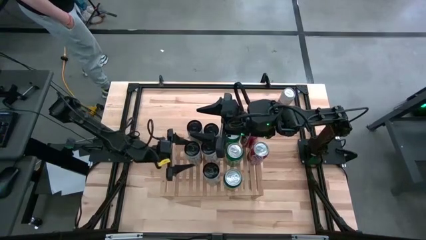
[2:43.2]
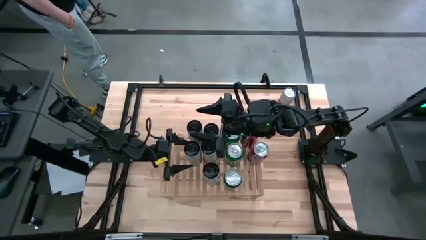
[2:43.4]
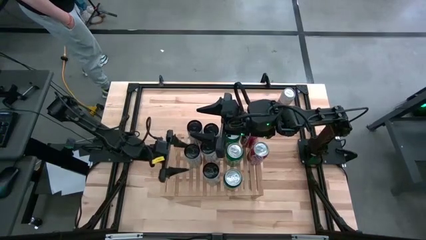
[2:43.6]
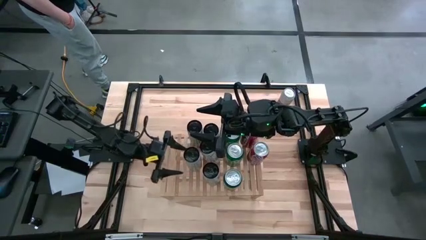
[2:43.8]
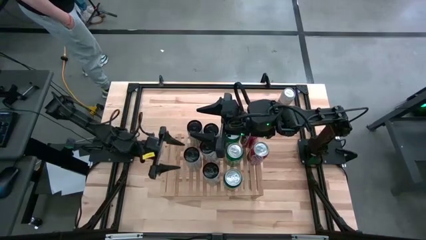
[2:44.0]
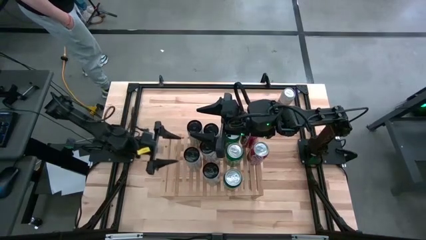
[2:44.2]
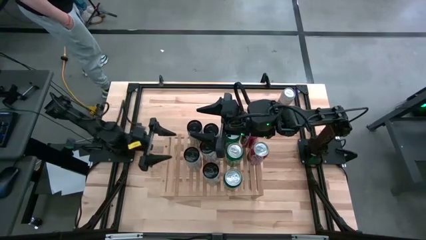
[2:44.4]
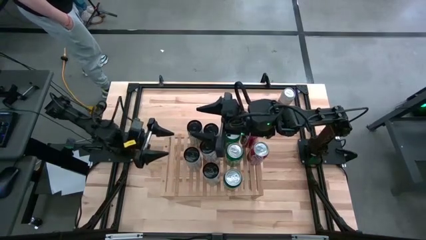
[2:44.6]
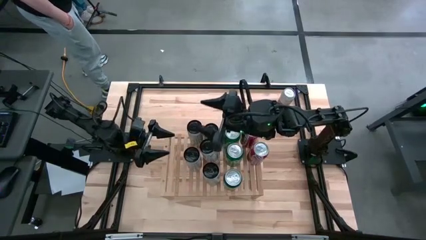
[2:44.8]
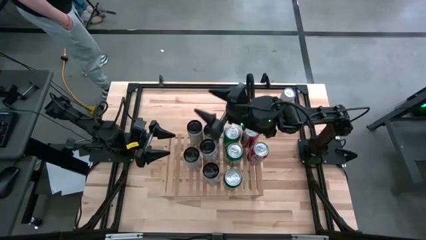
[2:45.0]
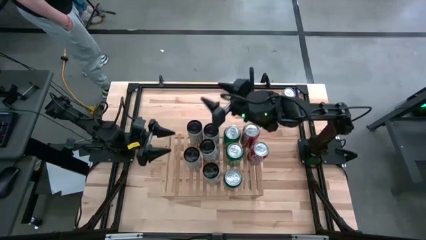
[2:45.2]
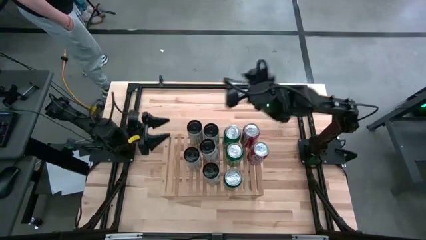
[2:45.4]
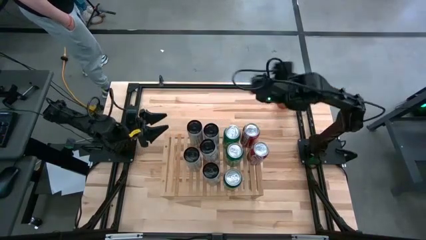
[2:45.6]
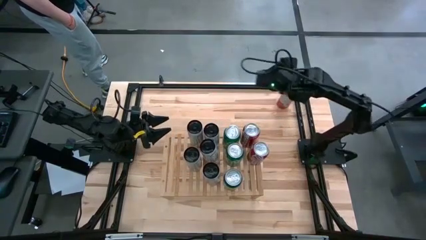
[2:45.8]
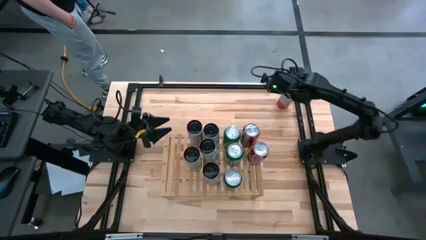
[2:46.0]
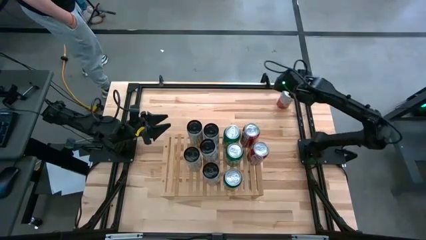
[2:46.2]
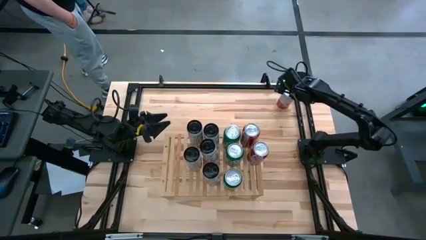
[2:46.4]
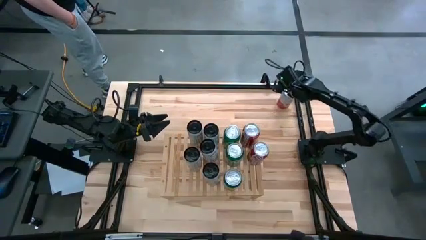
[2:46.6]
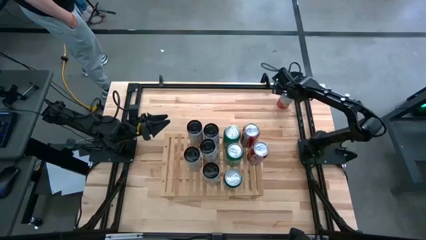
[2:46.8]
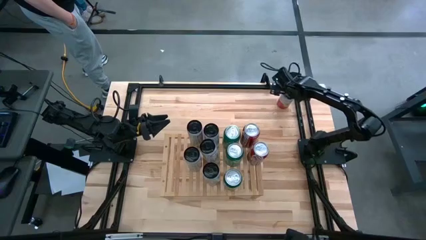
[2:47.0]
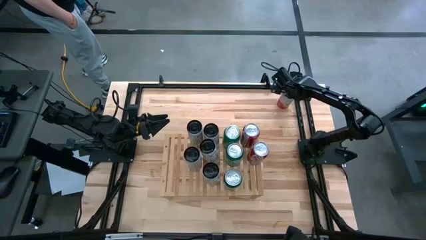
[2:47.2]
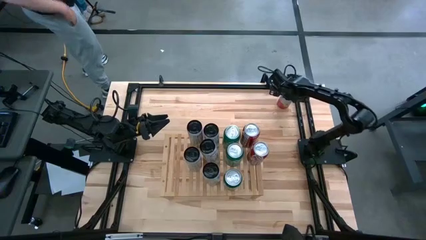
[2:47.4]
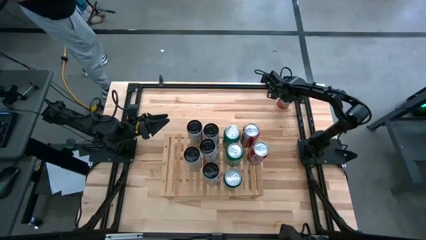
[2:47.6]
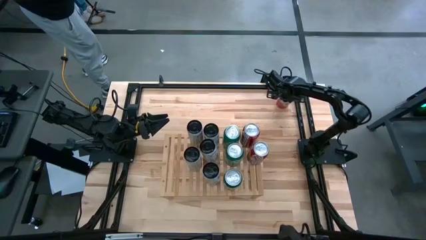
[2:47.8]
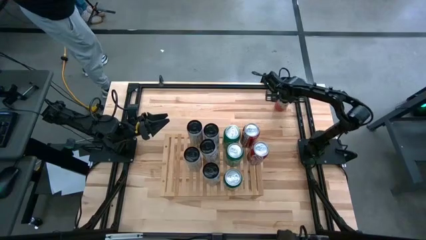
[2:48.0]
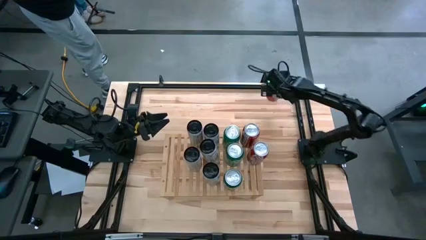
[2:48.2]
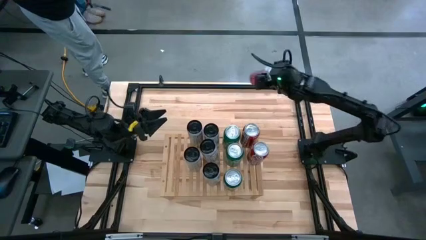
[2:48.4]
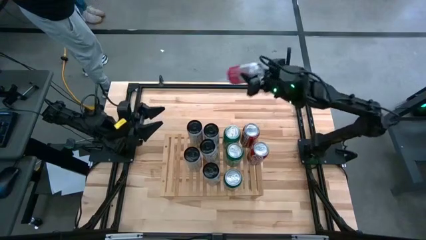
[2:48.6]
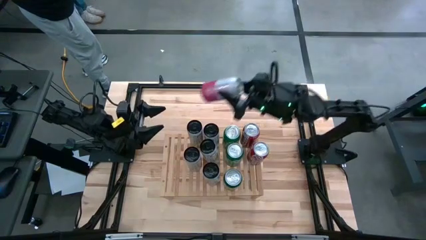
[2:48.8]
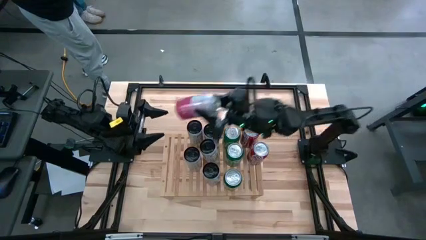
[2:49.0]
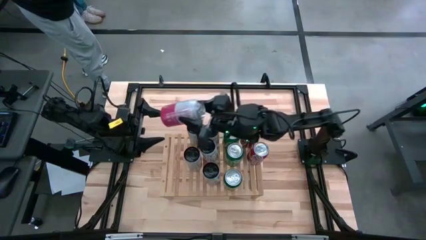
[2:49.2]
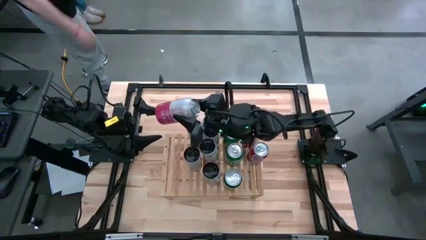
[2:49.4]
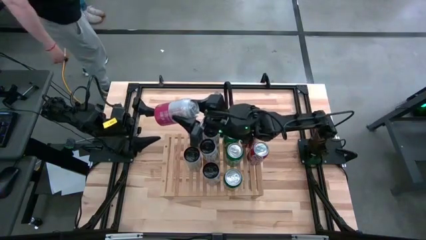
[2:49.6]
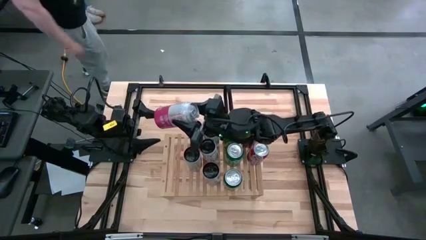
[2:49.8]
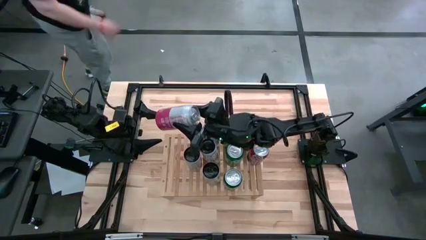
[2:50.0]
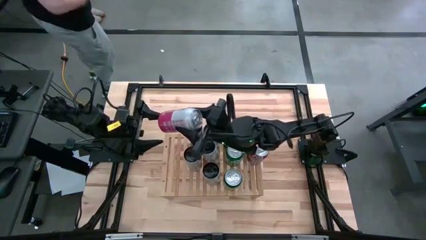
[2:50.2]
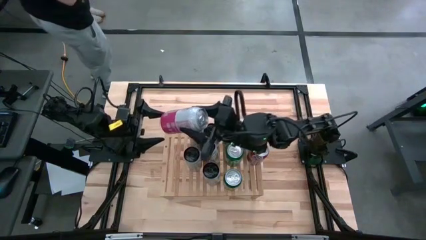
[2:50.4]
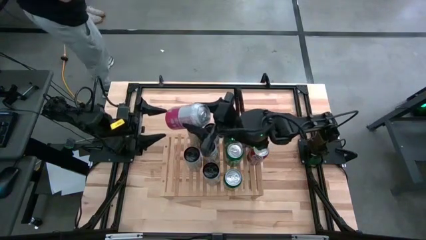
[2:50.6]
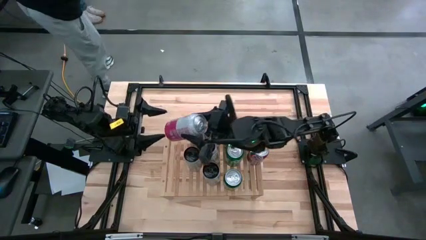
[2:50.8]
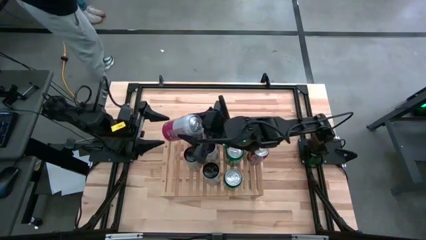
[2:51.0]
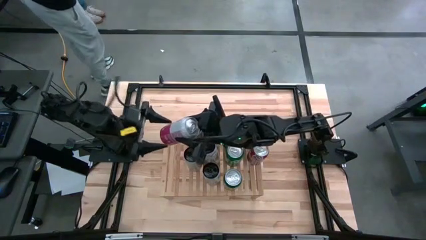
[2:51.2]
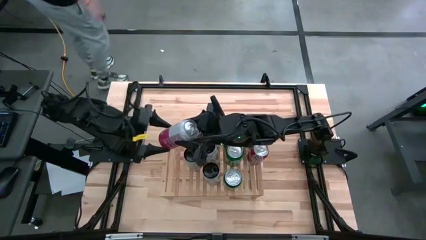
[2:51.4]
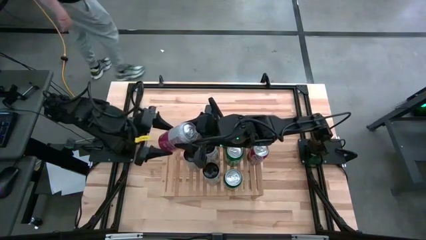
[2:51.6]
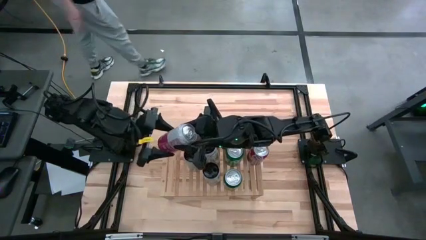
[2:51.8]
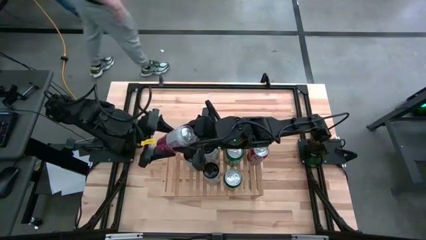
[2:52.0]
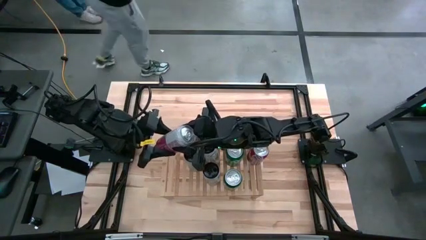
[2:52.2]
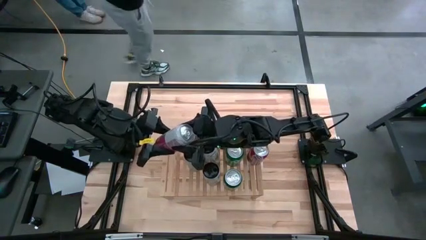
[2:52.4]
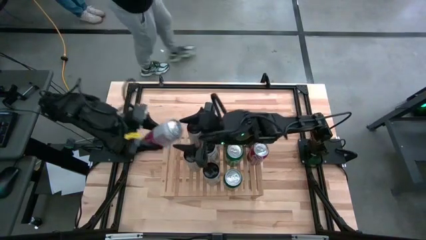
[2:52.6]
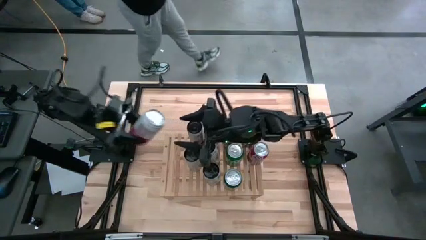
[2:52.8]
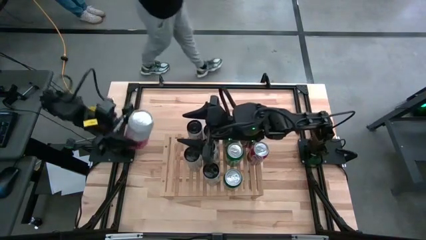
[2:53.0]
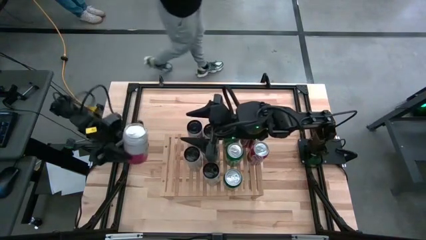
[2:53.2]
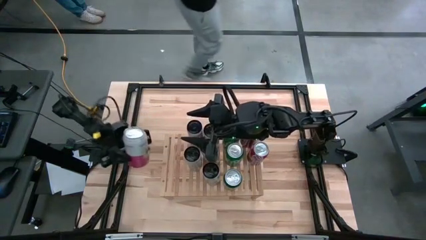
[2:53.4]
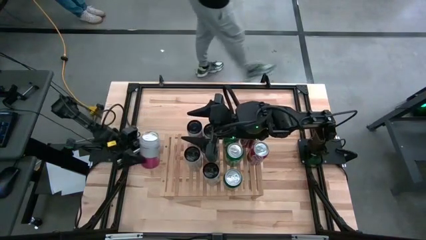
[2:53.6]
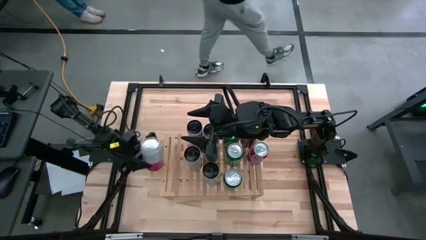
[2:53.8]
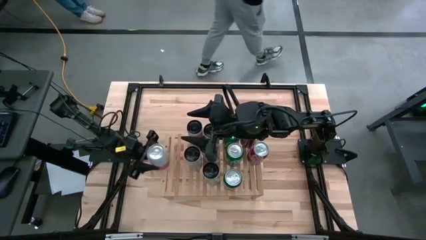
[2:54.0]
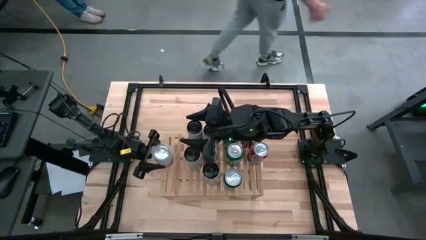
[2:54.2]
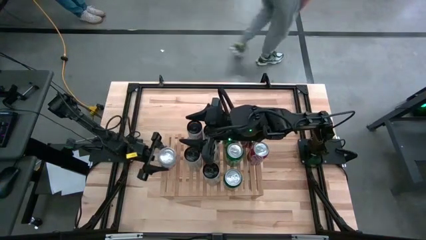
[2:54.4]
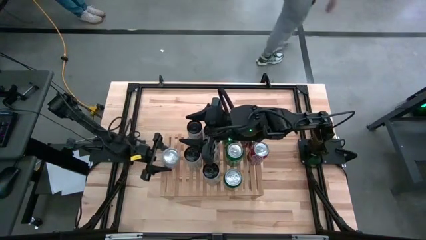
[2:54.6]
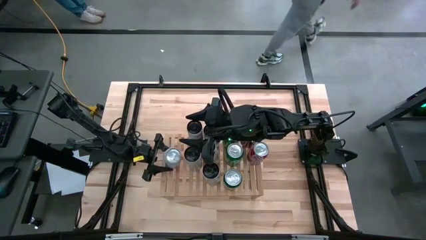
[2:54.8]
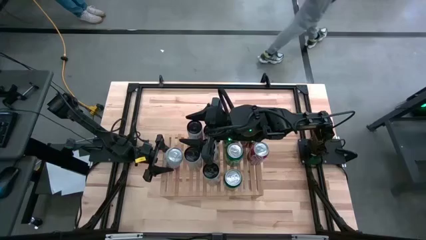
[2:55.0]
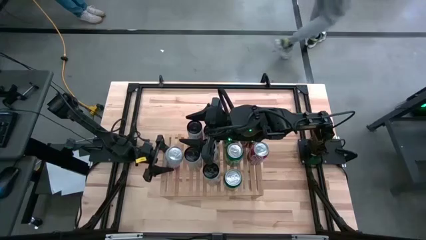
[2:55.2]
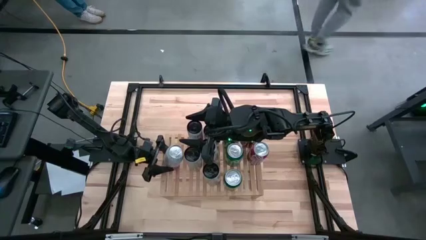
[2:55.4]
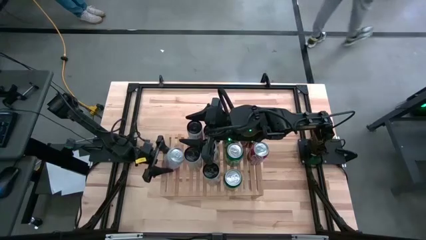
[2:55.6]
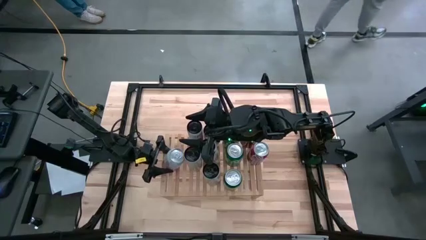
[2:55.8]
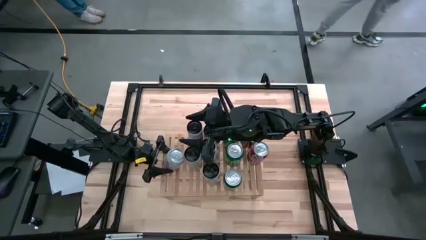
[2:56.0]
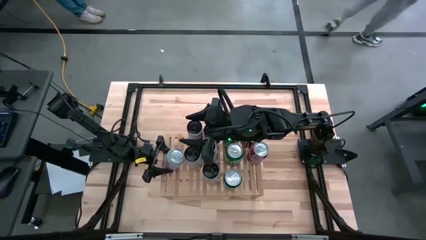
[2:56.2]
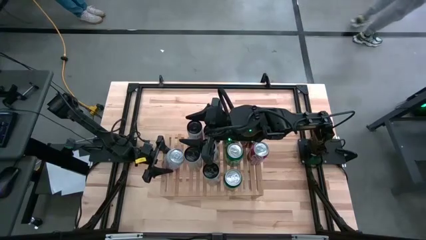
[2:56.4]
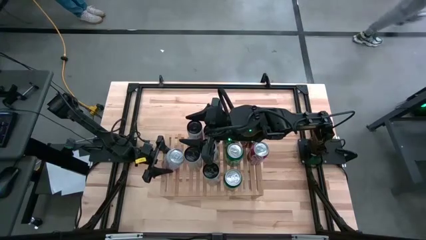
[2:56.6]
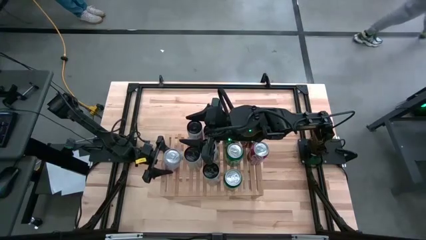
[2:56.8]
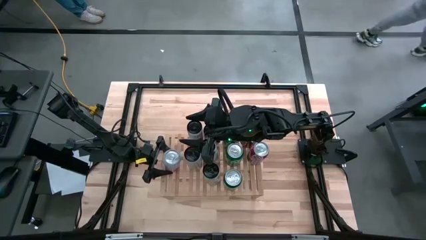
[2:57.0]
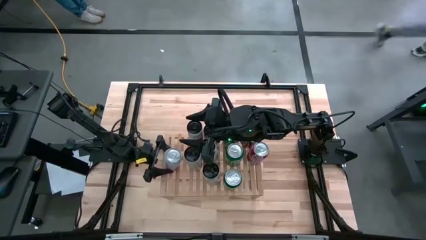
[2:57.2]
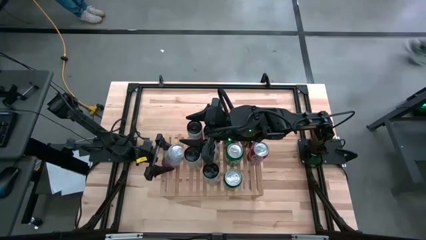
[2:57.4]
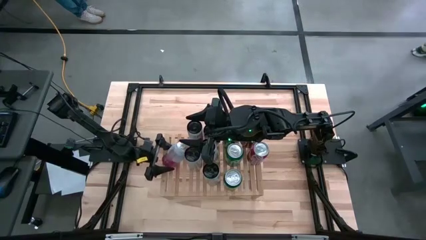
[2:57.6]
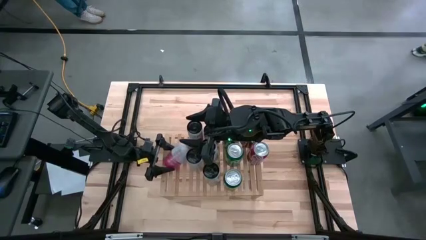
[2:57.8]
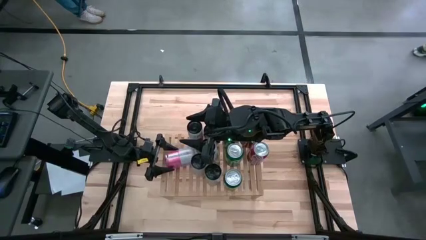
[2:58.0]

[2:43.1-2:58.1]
Task: Place canned beverage on shelf
Put the pink-white soda can on the shelf

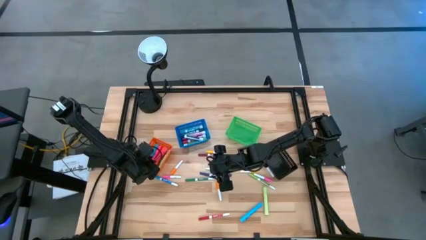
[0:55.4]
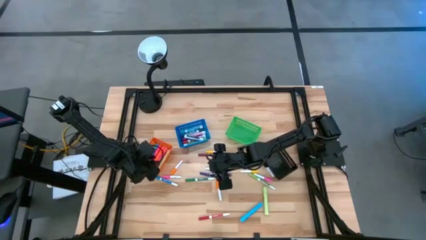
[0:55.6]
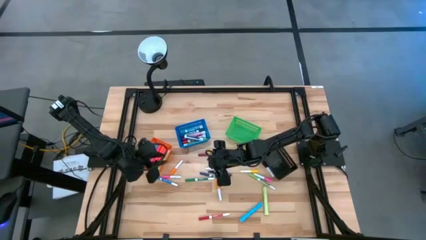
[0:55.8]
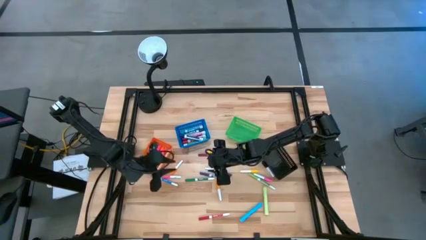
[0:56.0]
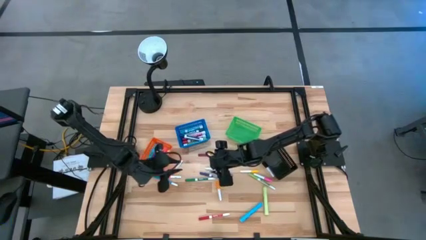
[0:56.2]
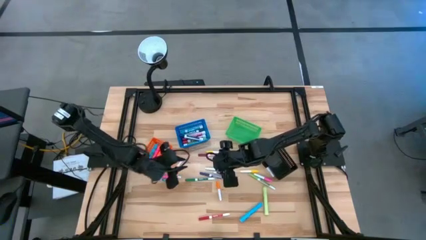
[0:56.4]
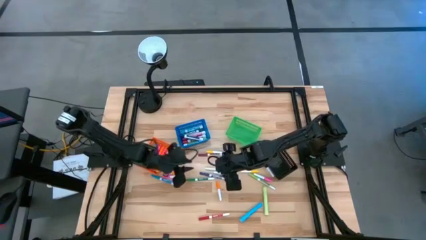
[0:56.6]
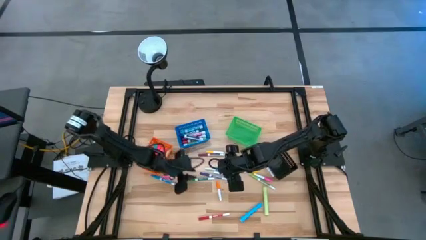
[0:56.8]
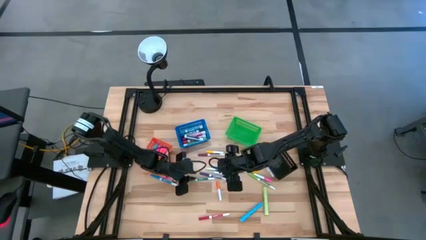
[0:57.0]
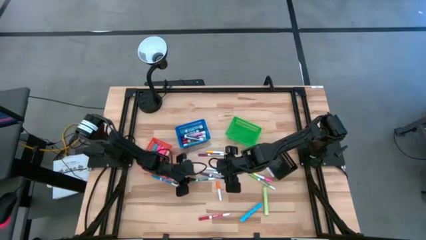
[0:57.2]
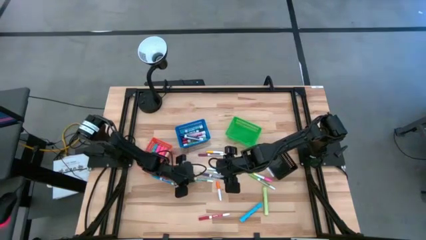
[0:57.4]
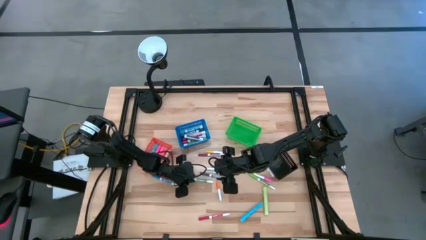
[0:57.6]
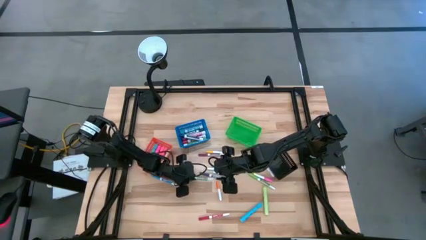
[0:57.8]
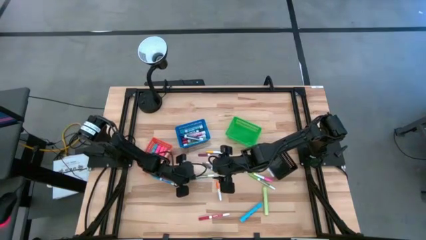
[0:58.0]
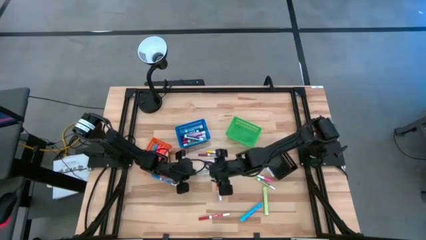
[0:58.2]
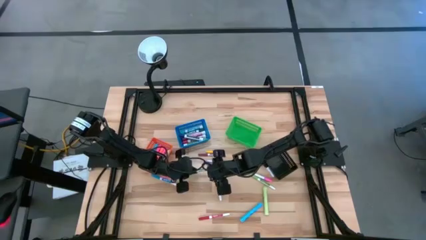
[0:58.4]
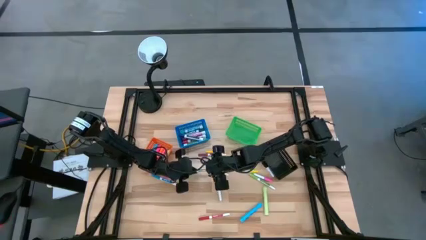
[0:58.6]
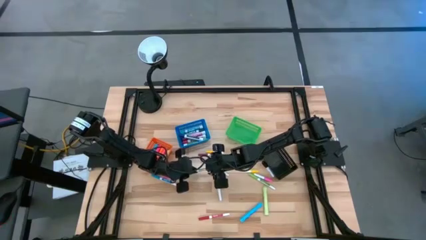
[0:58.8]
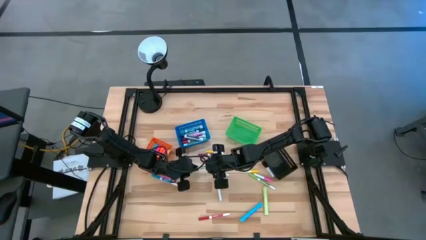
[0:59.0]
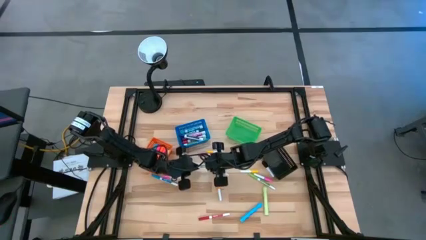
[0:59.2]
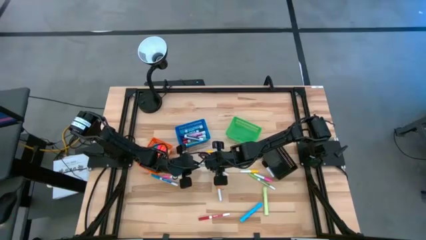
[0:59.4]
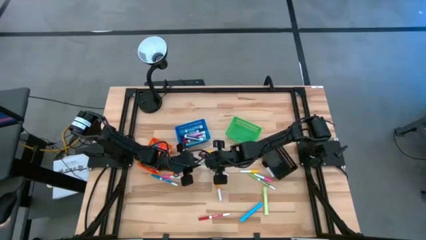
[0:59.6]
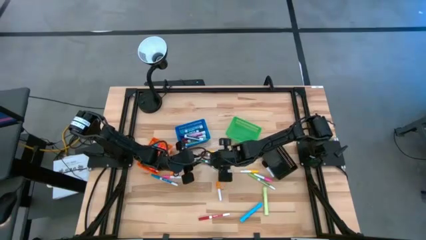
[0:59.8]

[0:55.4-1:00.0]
Task: Pick & Place Markers
Put the large dark green marker pen into the green basket
